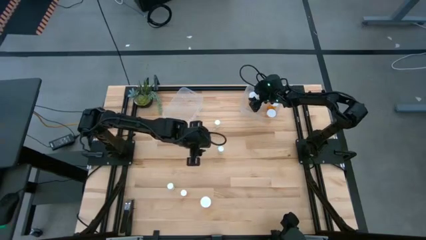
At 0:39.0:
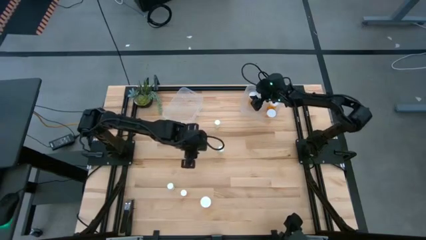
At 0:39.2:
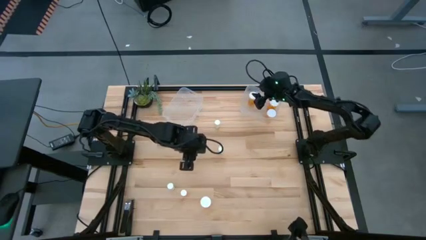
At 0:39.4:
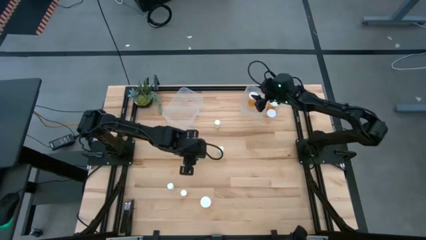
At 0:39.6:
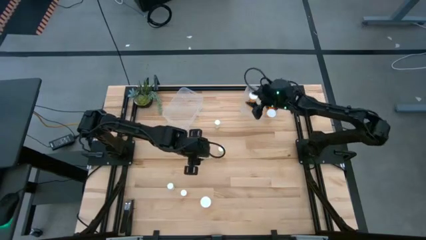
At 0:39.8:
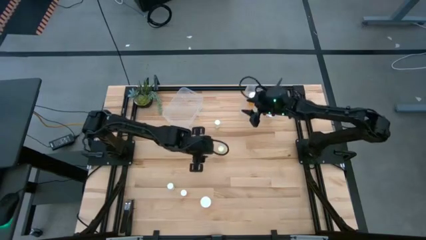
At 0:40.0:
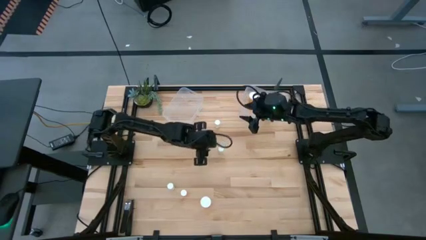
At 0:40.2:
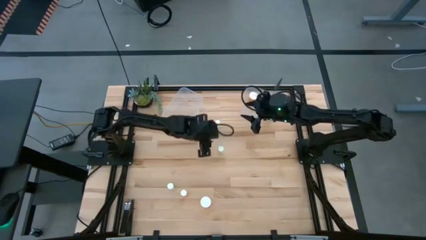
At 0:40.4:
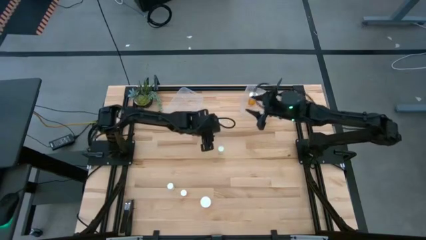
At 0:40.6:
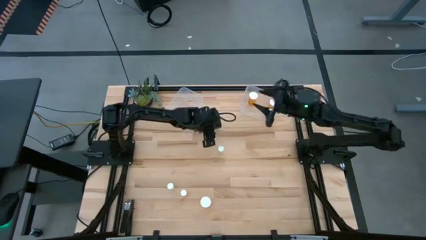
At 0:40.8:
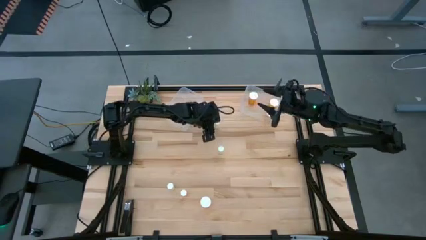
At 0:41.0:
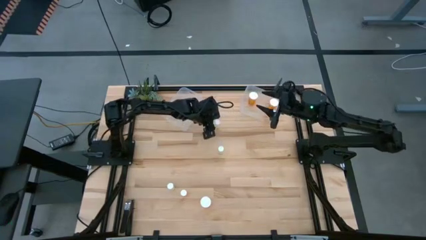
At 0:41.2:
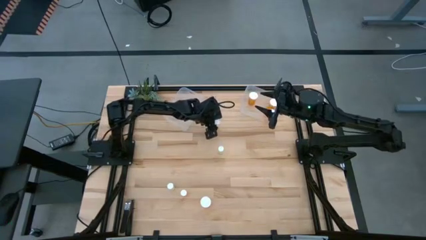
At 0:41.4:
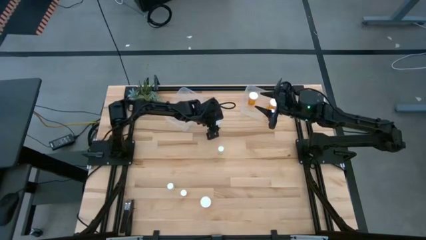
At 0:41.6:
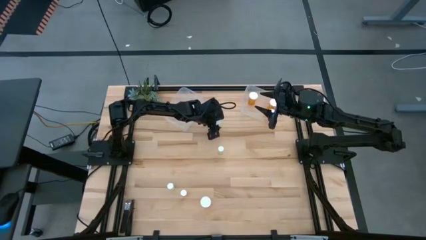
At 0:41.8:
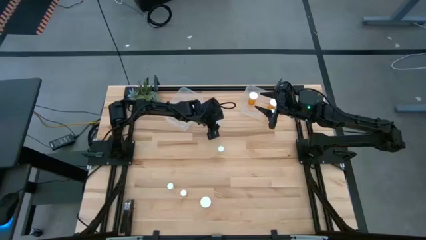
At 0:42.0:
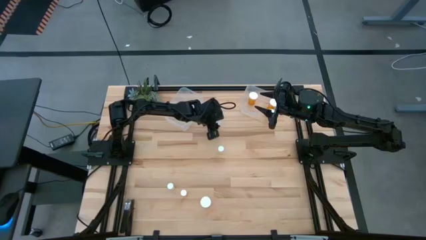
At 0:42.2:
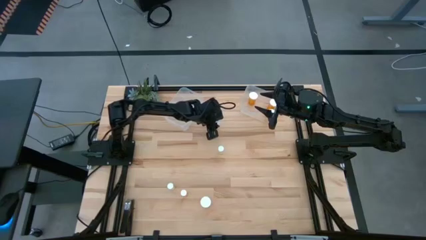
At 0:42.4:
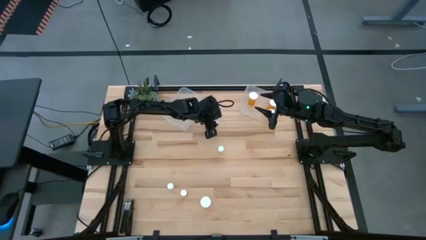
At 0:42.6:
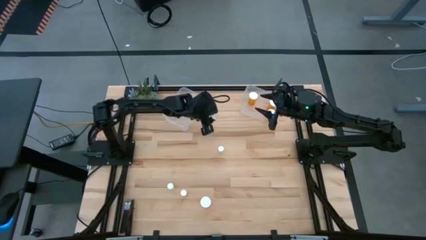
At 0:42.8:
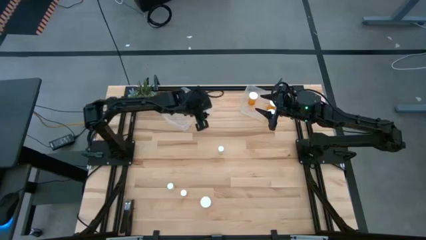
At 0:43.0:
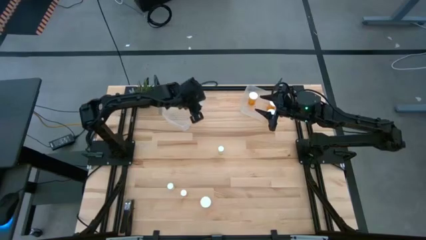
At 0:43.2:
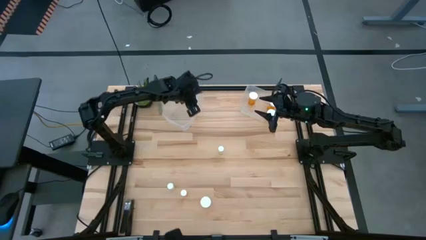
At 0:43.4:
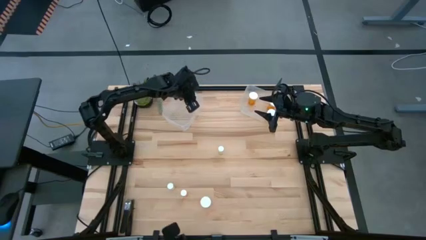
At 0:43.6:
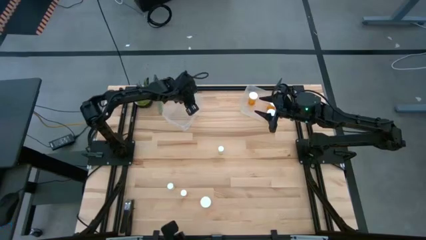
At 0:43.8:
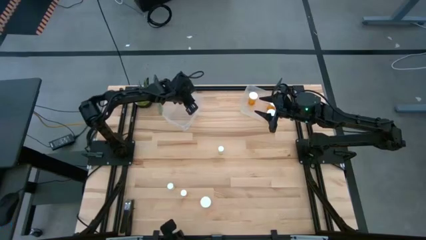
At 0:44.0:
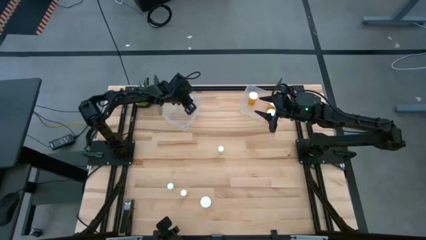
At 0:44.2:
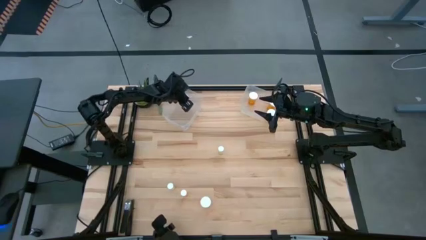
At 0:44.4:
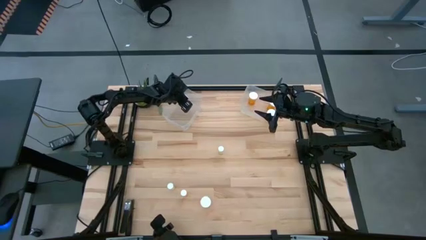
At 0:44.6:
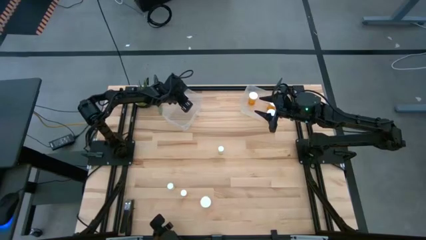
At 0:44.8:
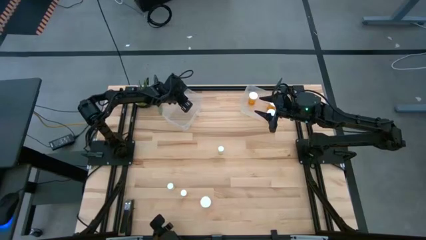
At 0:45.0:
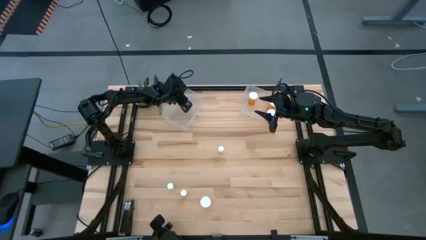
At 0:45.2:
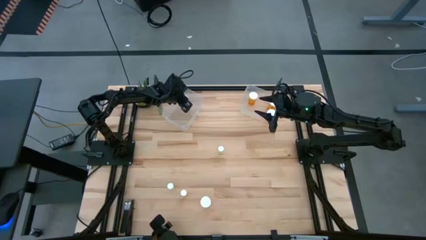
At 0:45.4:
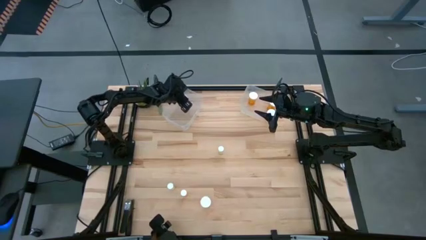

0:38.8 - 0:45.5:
Task: Pick and place medicine bottles into bin by pill shape (circle, oval)
Put the small yellow tablet bottle into the left transparent bin

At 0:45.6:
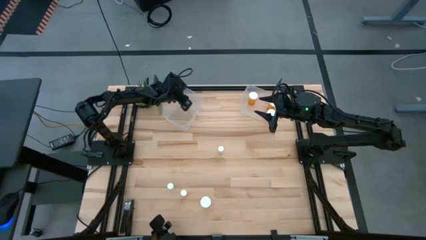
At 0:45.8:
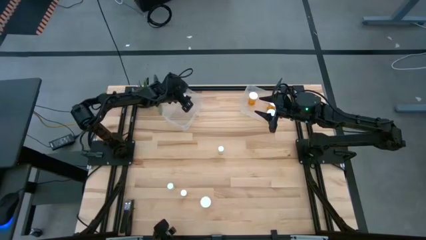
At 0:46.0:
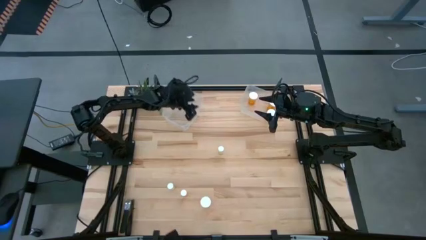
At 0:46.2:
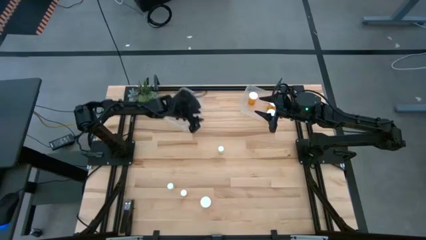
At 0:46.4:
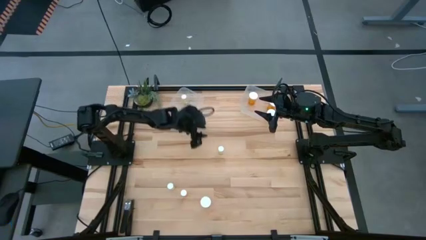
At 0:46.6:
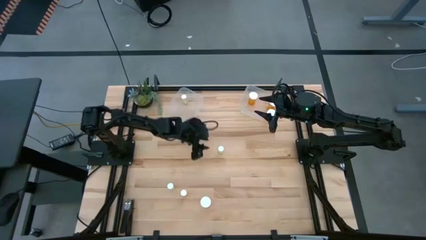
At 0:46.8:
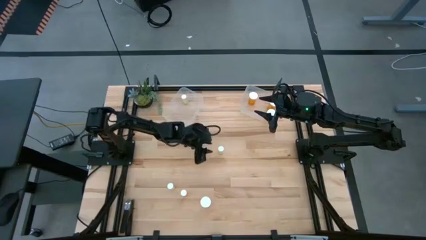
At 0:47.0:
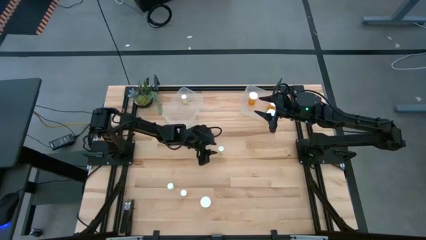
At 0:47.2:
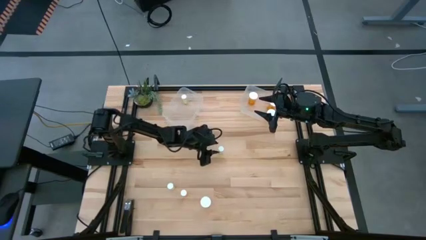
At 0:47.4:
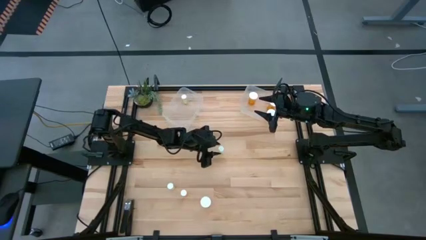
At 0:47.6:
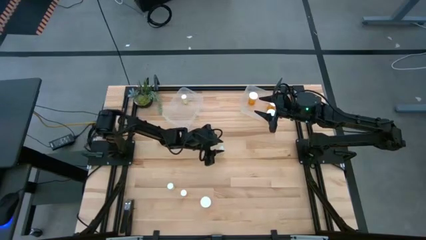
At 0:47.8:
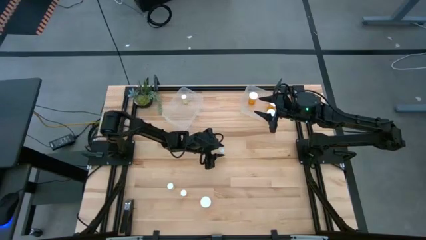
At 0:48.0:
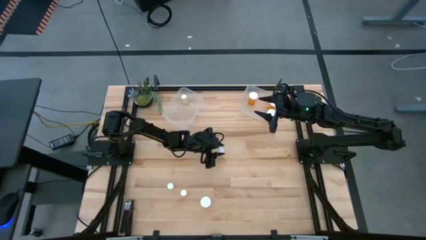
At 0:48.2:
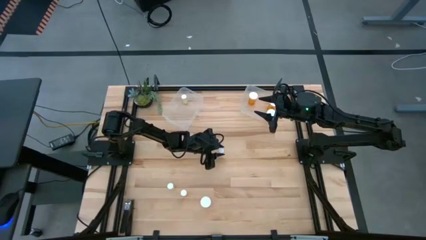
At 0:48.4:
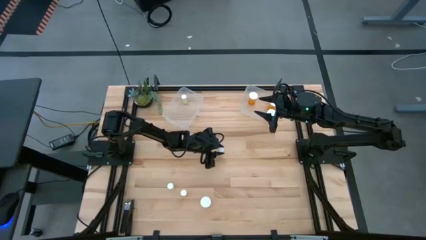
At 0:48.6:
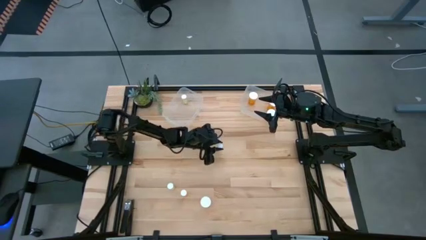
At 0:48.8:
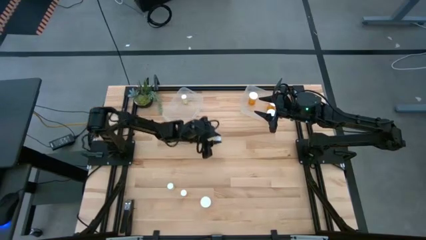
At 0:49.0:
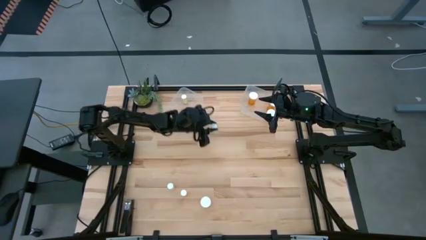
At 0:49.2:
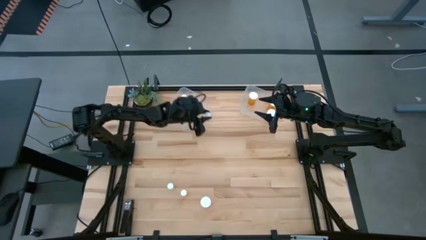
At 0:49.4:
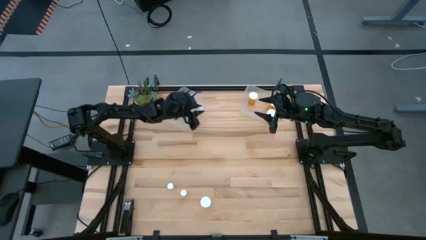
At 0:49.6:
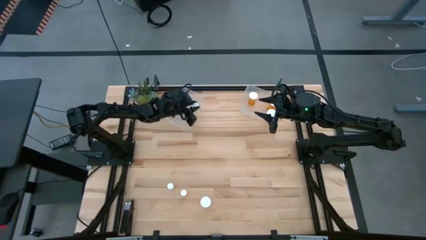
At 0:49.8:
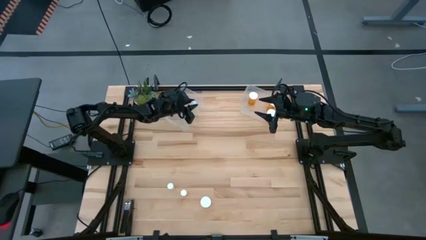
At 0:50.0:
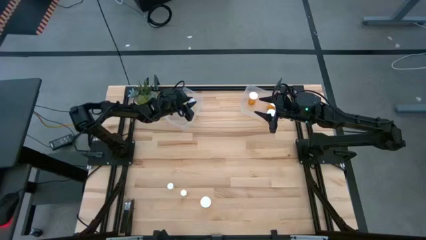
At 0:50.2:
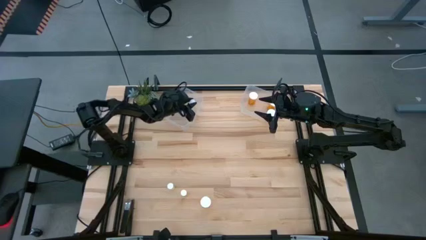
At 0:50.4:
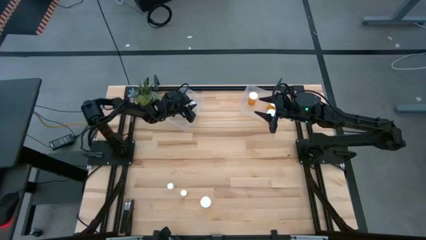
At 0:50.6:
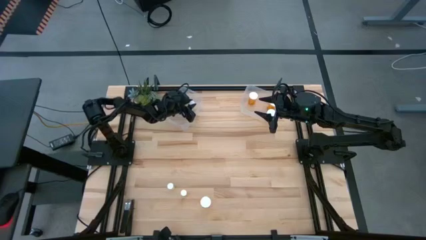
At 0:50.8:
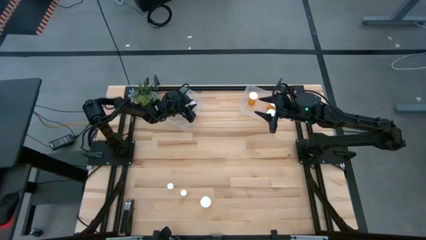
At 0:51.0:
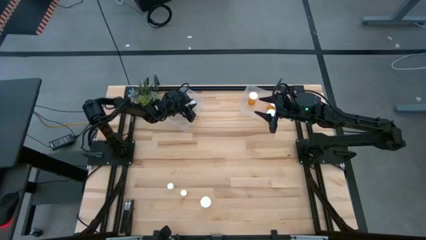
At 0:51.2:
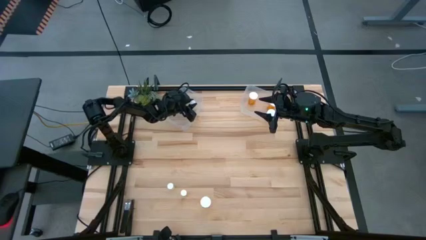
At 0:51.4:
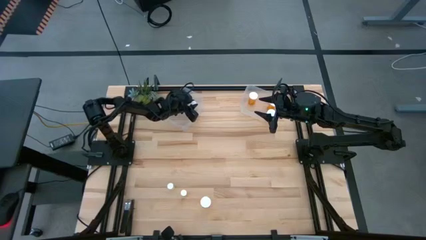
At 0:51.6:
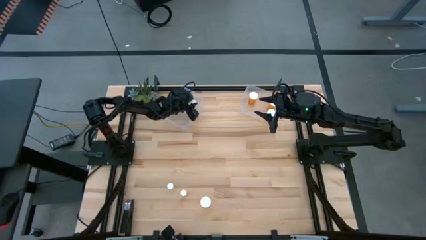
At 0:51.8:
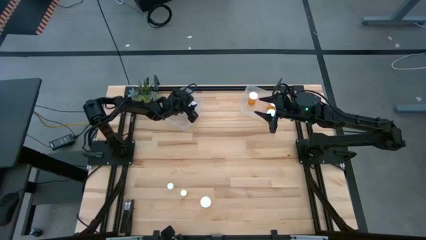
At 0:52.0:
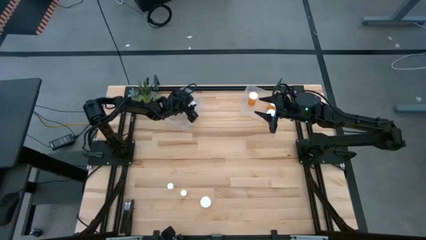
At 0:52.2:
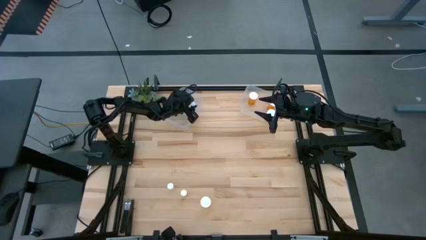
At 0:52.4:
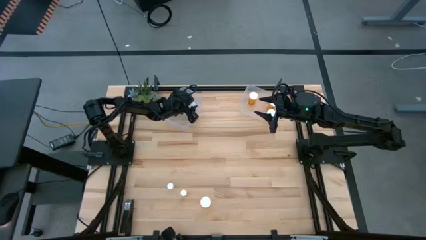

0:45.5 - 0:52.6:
Put the small yellow tablet bottle into the left transparent bin
